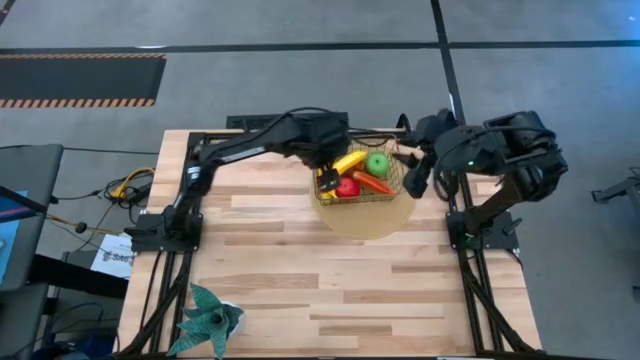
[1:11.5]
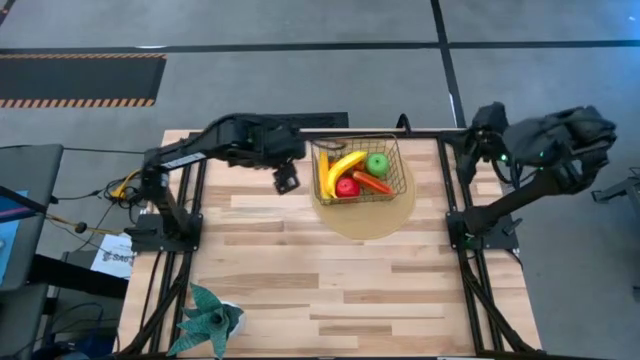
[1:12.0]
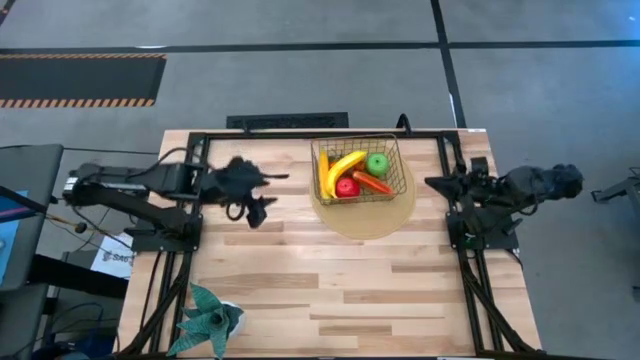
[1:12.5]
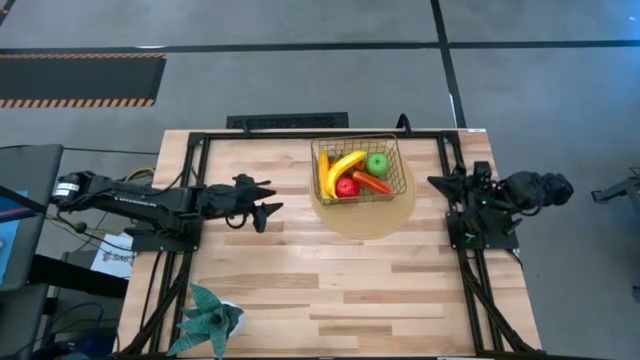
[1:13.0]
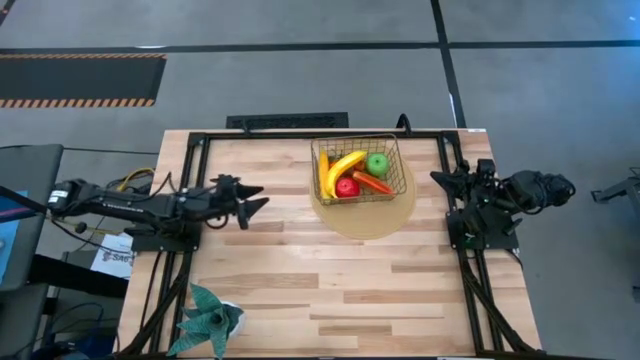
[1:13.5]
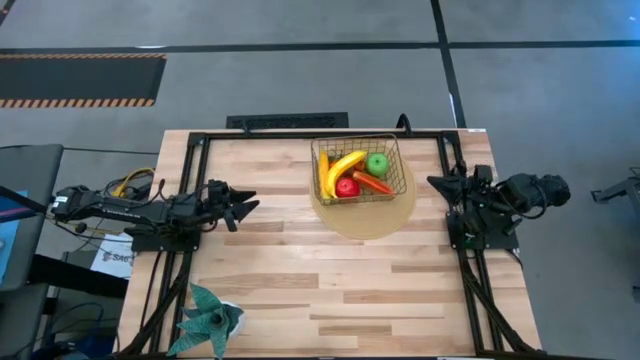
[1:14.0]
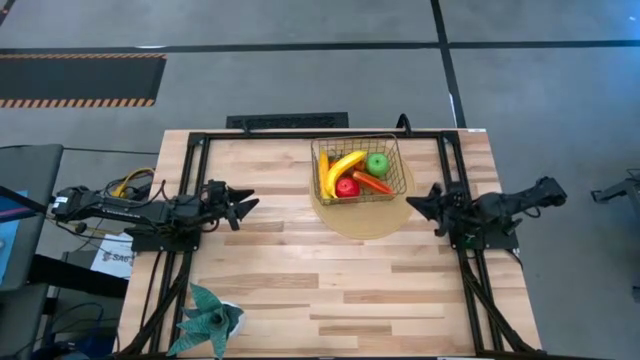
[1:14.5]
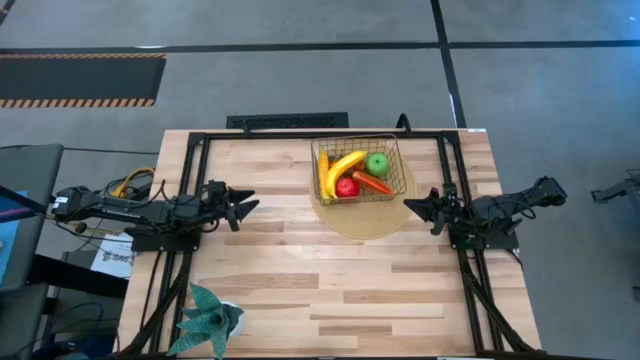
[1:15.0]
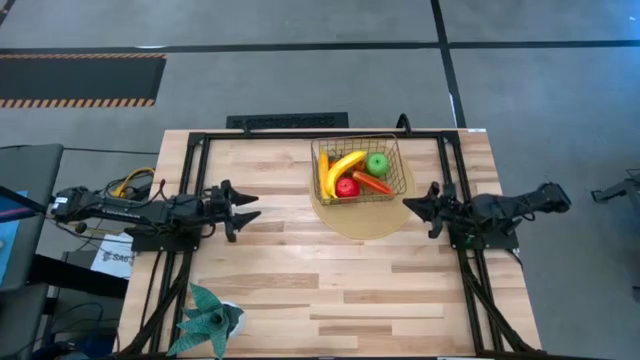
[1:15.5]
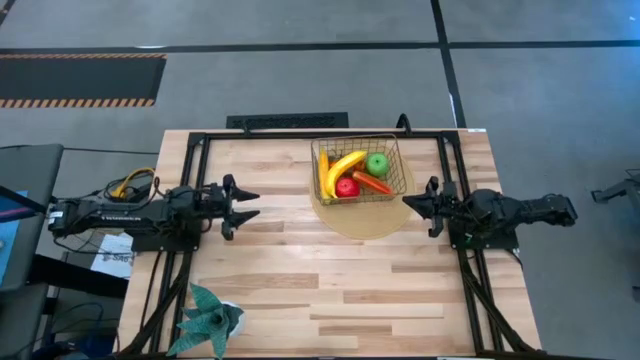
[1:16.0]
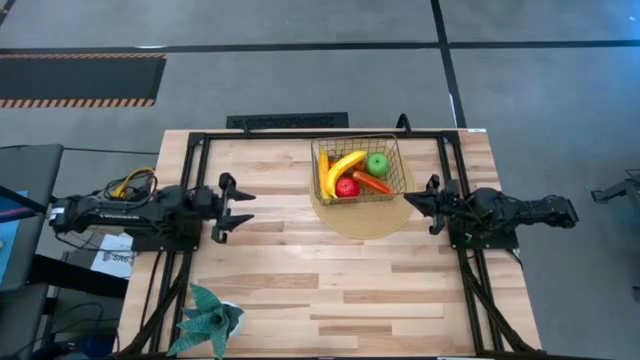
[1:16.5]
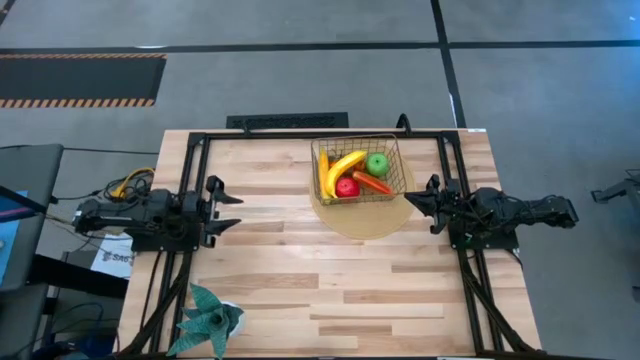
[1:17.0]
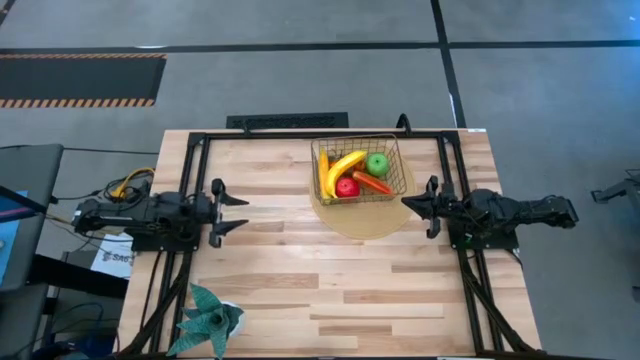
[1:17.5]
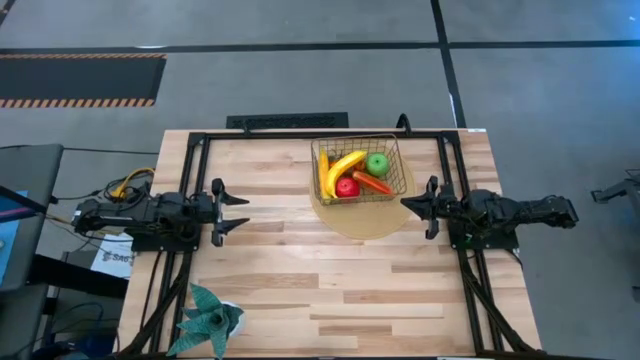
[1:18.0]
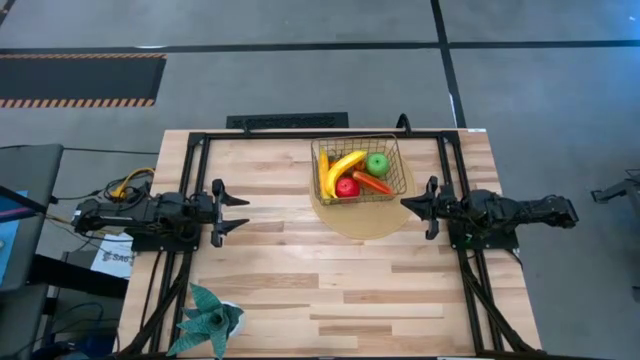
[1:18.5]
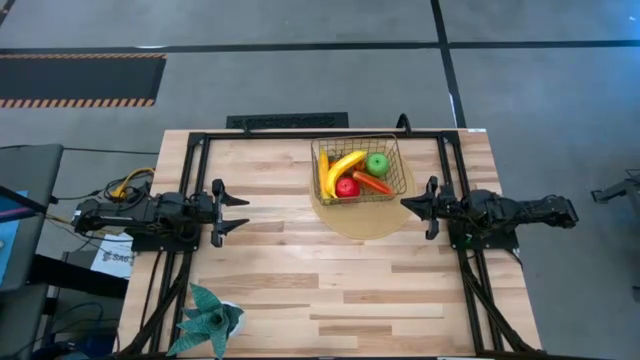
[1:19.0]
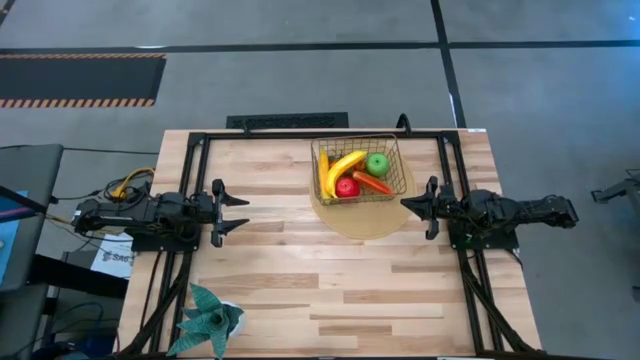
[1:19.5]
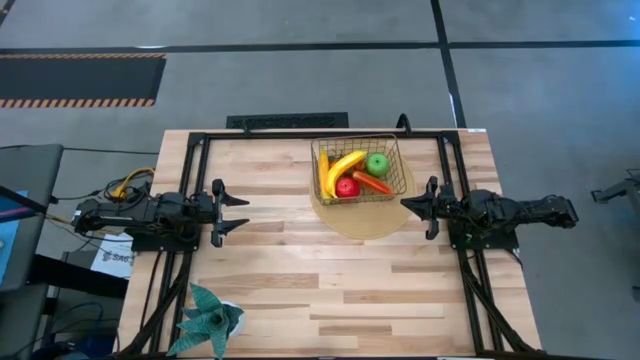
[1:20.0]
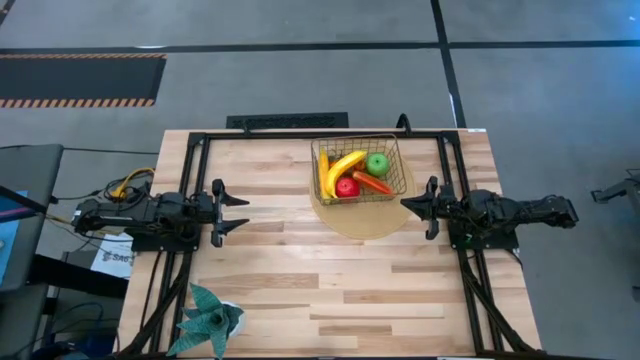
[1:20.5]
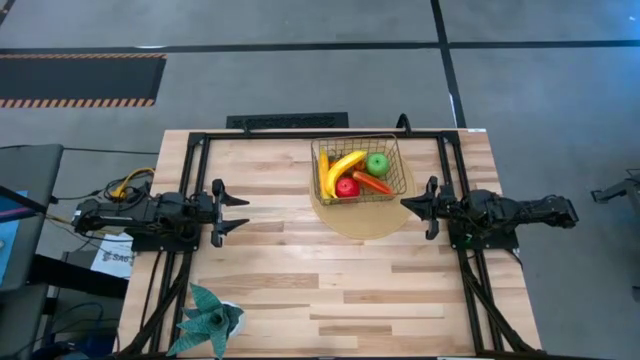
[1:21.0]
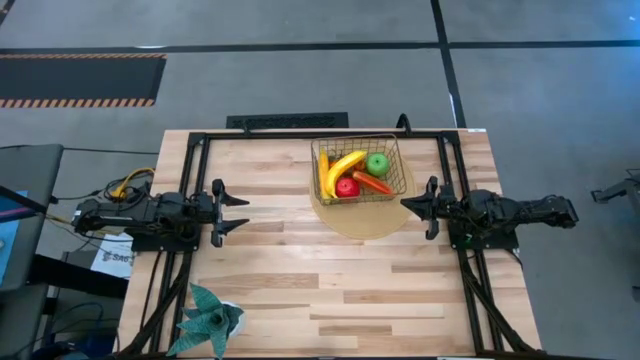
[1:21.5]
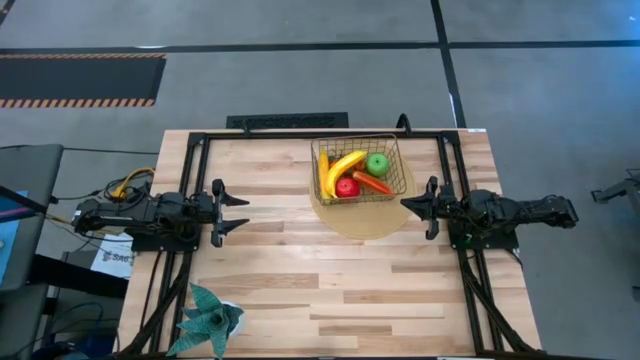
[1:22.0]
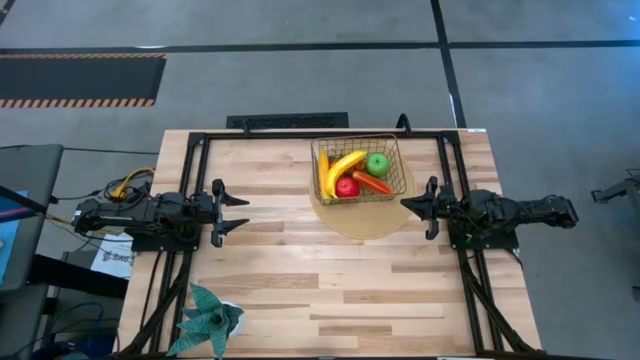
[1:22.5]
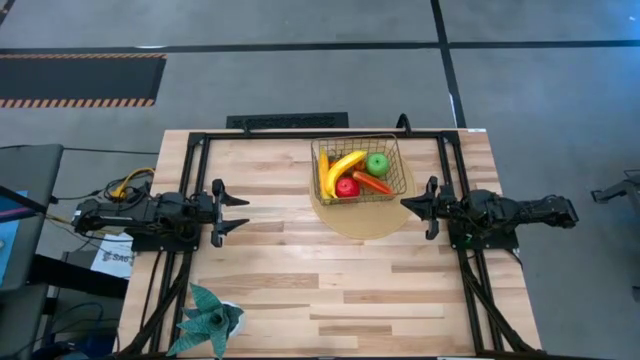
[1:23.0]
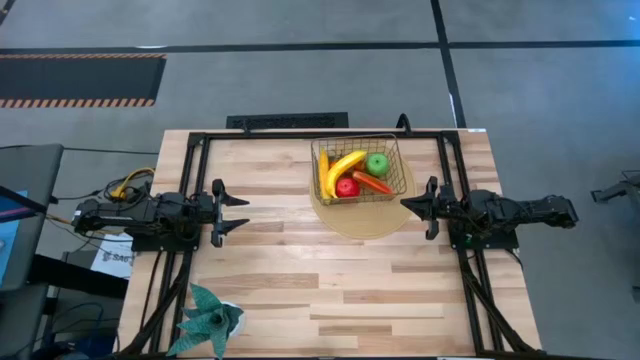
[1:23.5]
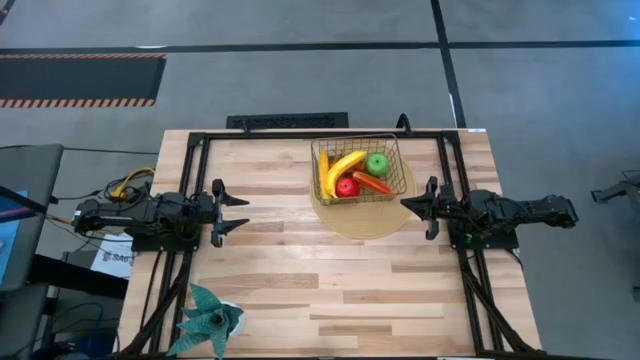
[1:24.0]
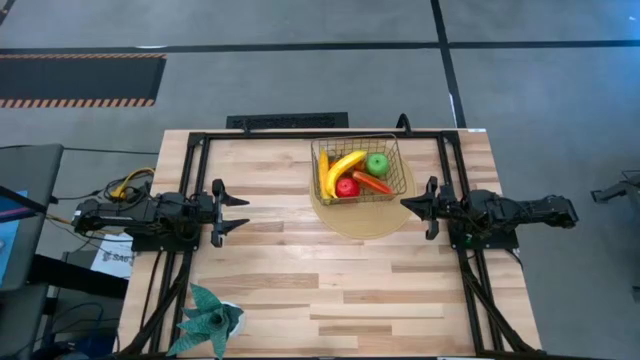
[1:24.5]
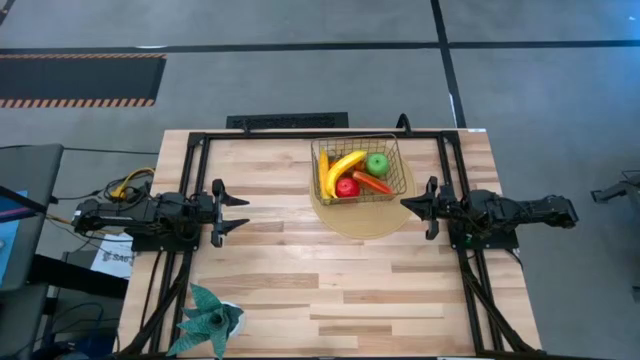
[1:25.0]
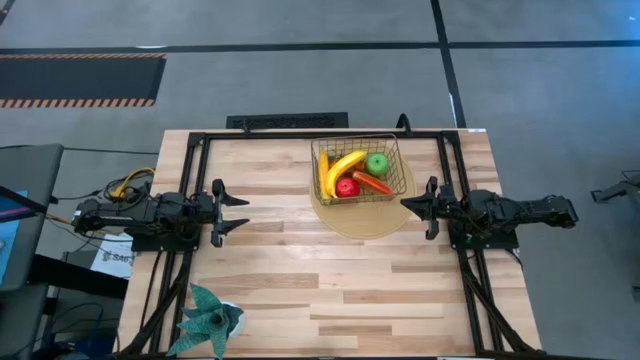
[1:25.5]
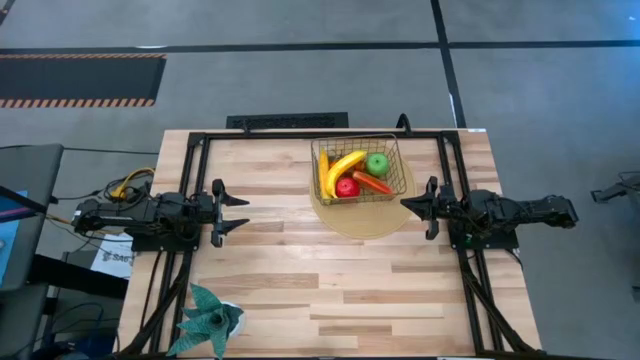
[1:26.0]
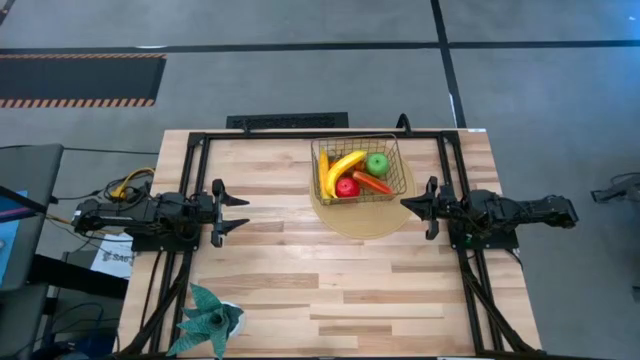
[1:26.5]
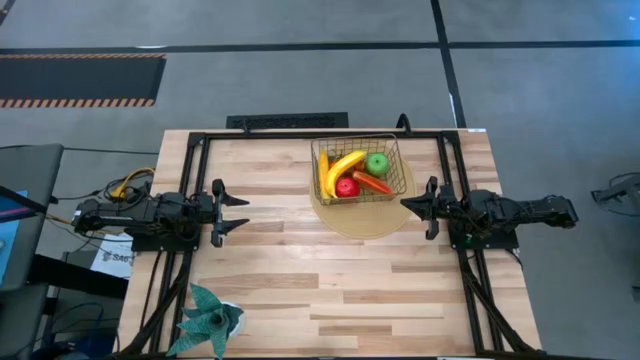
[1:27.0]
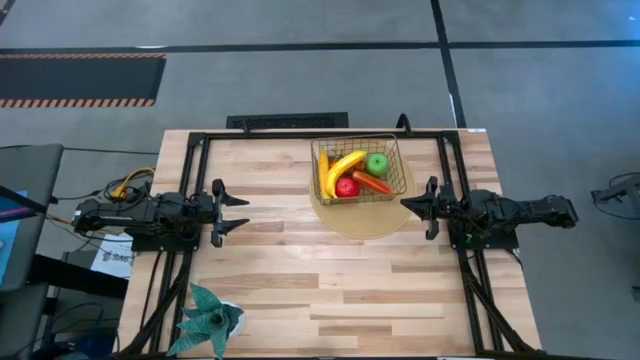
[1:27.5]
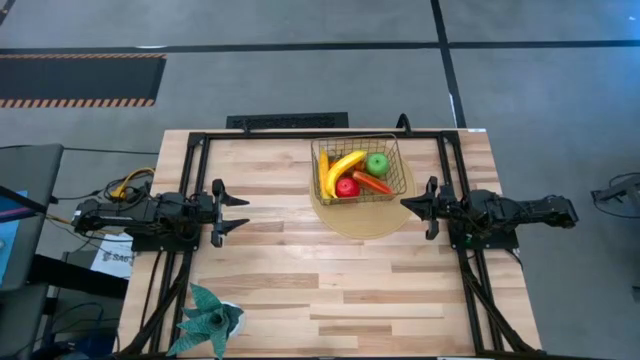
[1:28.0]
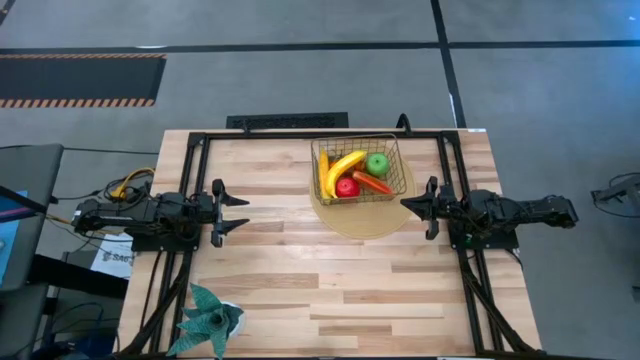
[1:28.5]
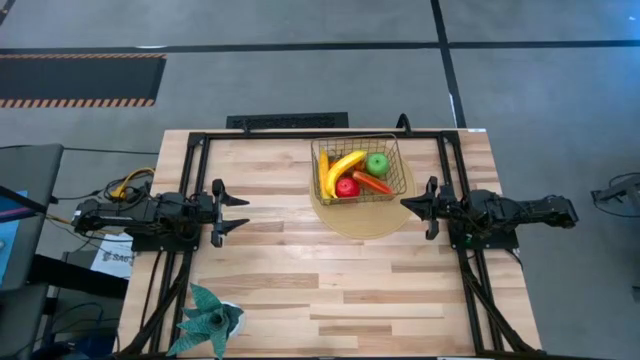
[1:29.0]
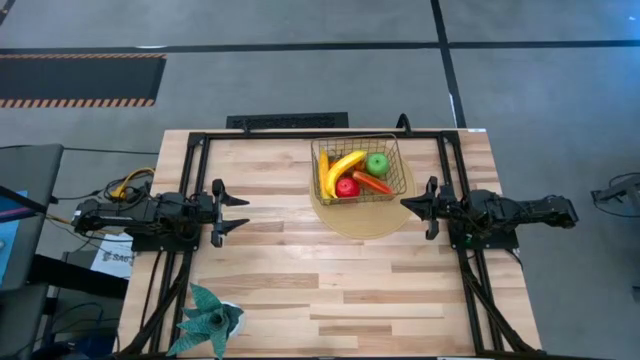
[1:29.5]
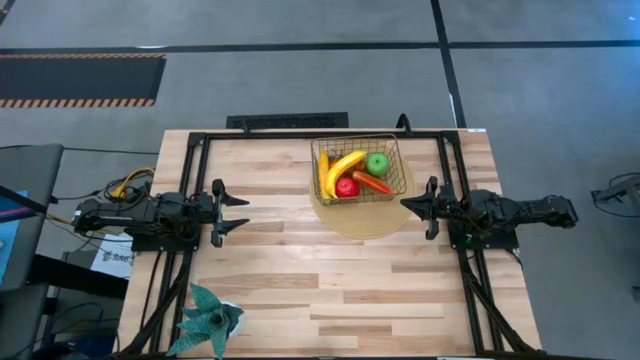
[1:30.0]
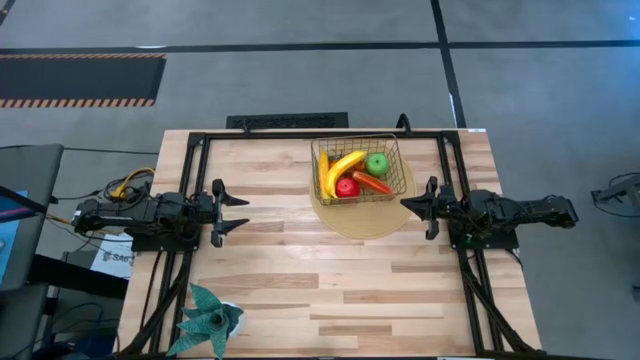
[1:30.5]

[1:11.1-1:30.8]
Task: Build produce basket
Return to Home Position

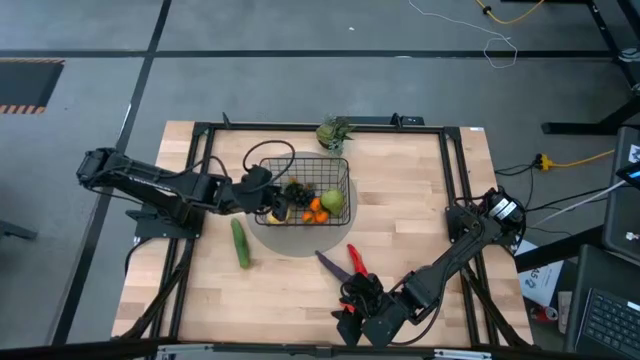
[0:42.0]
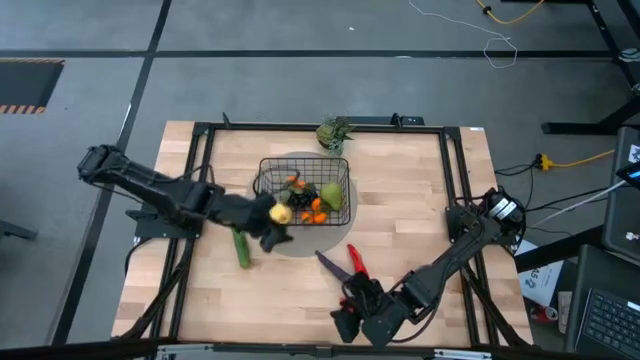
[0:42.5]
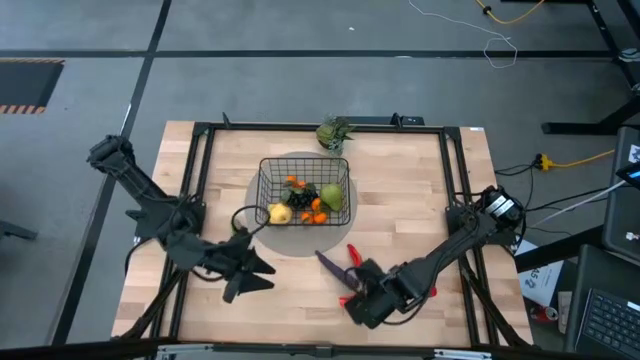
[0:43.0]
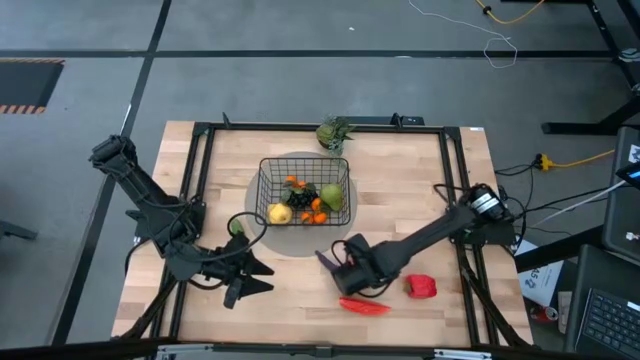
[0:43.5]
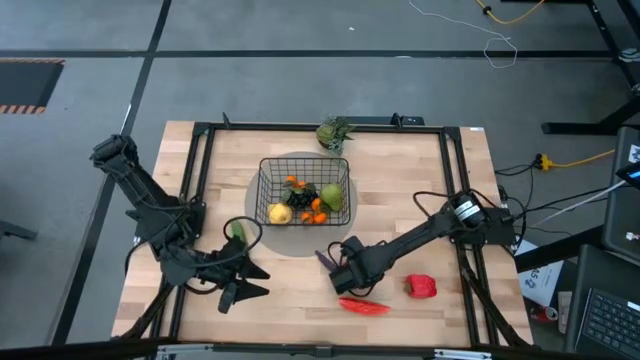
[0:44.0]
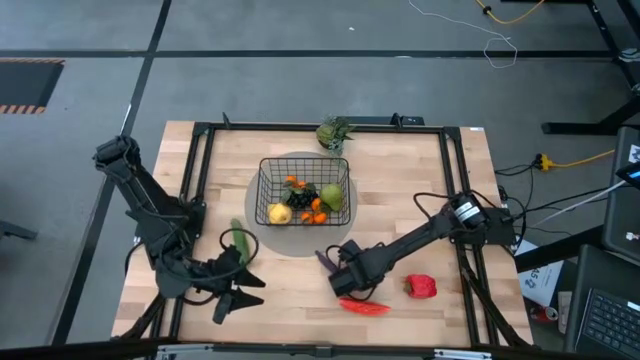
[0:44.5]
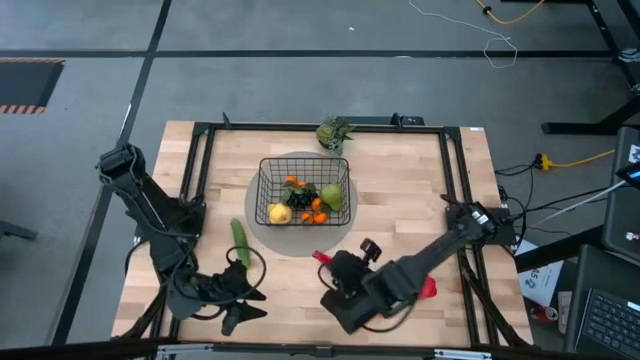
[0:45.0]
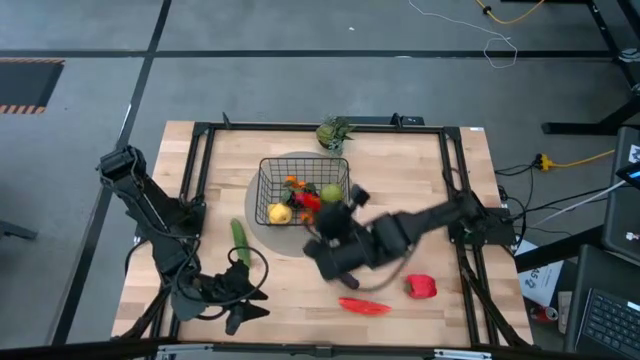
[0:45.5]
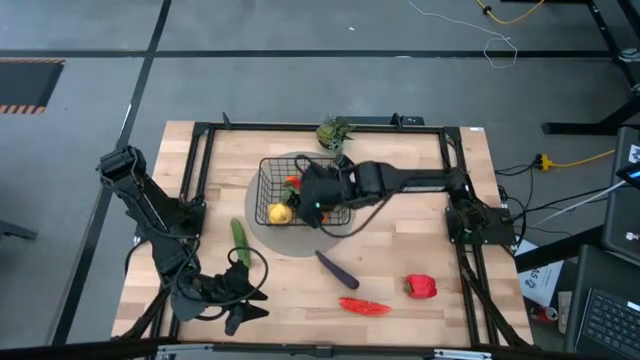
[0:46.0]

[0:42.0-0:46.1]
Task: Build produce basket
Put the red chili pepper into the black wire basket
